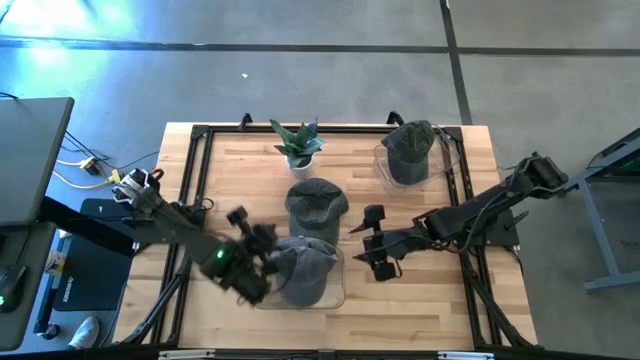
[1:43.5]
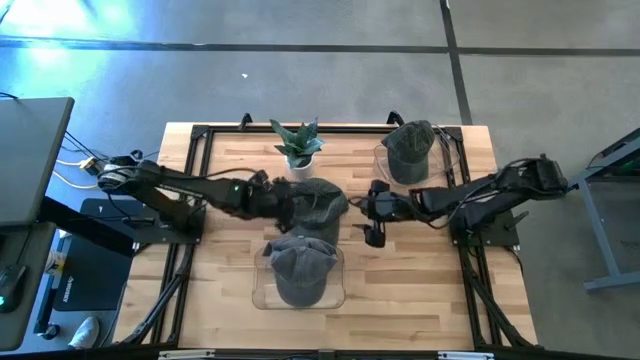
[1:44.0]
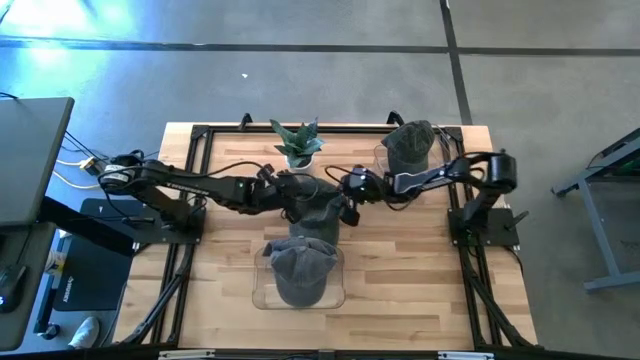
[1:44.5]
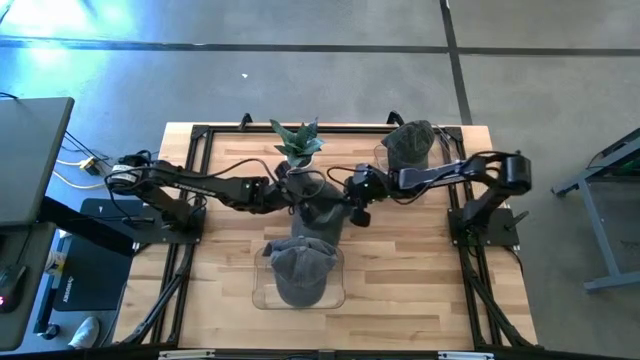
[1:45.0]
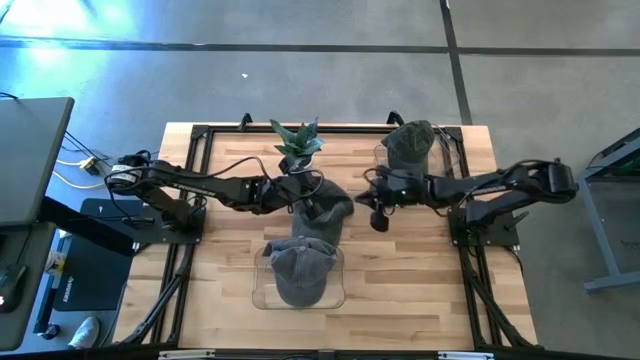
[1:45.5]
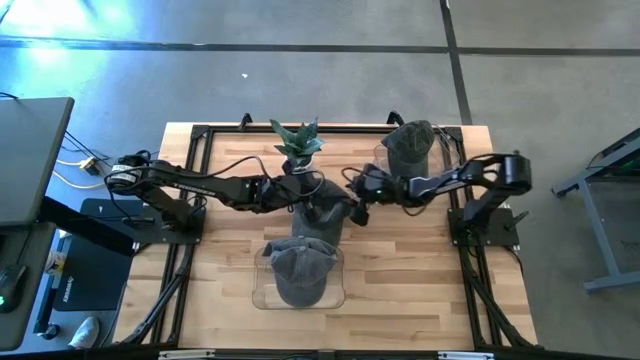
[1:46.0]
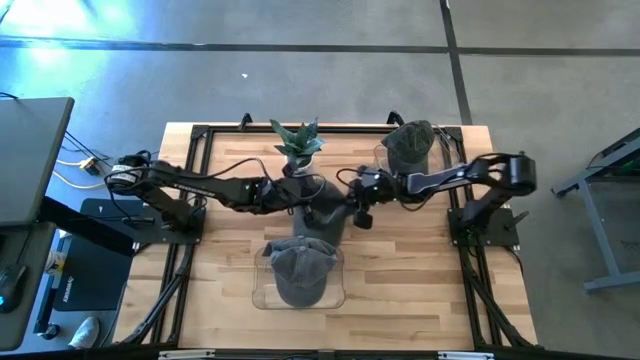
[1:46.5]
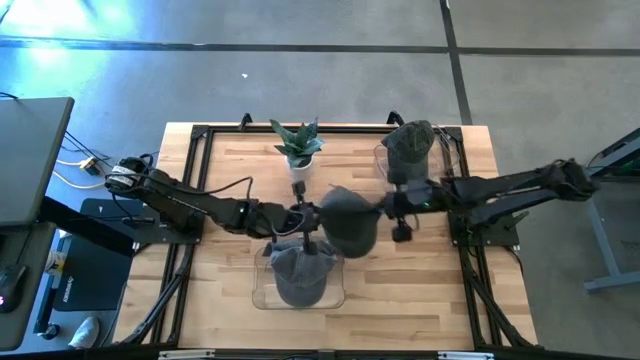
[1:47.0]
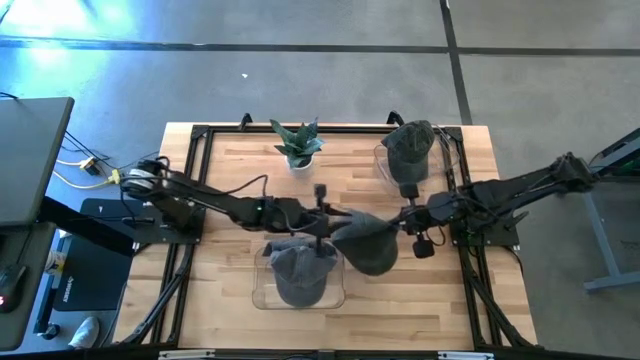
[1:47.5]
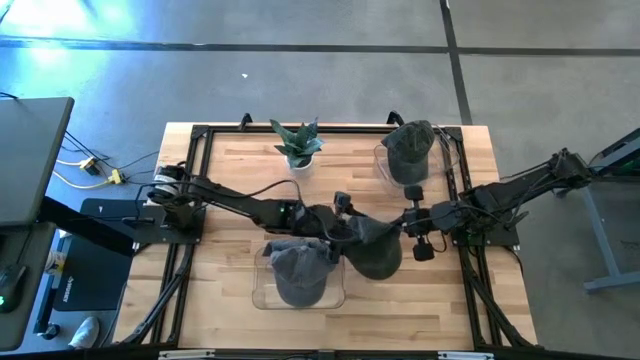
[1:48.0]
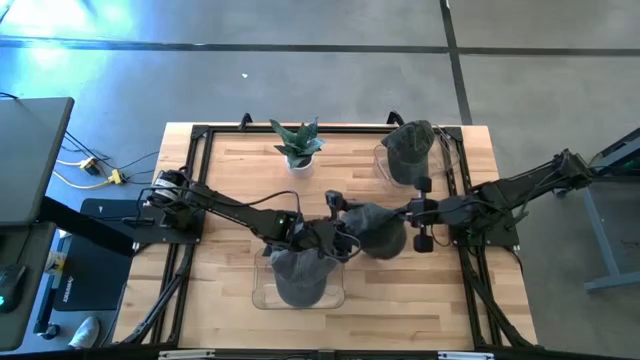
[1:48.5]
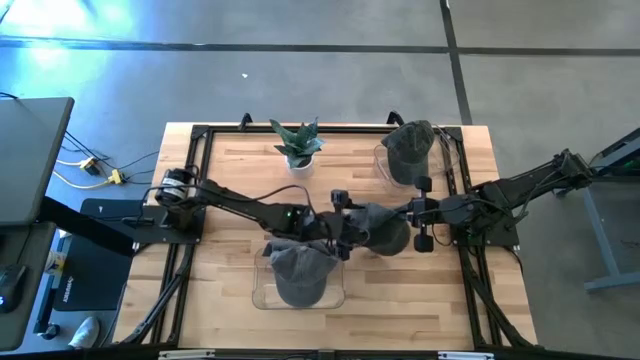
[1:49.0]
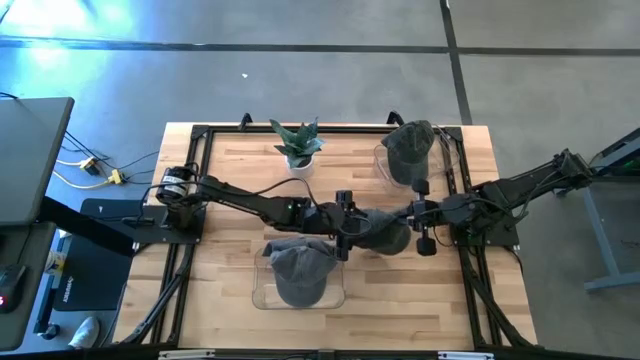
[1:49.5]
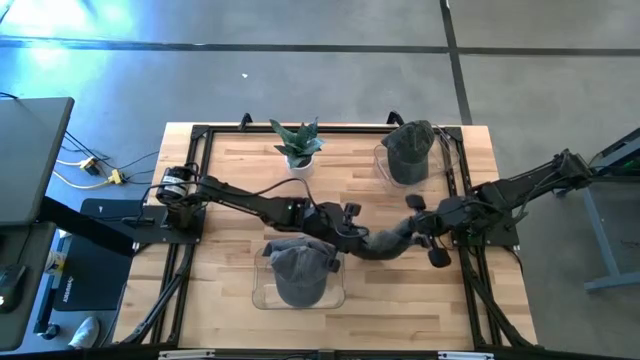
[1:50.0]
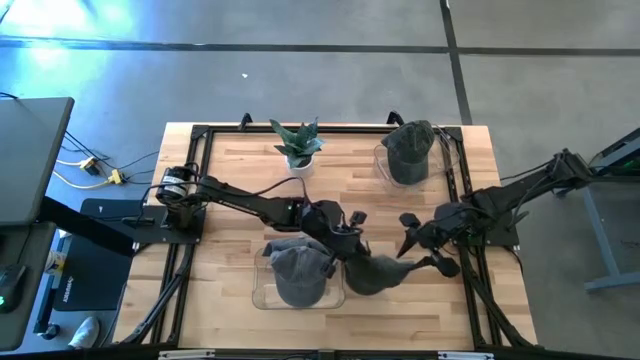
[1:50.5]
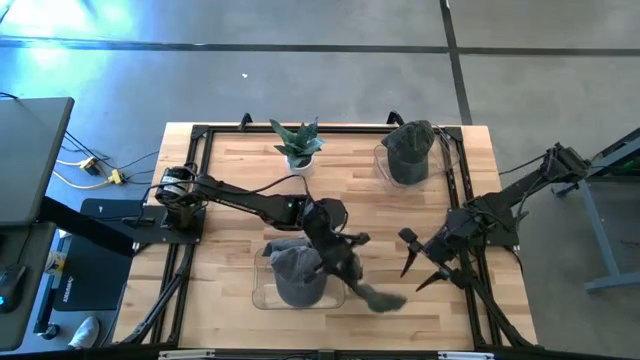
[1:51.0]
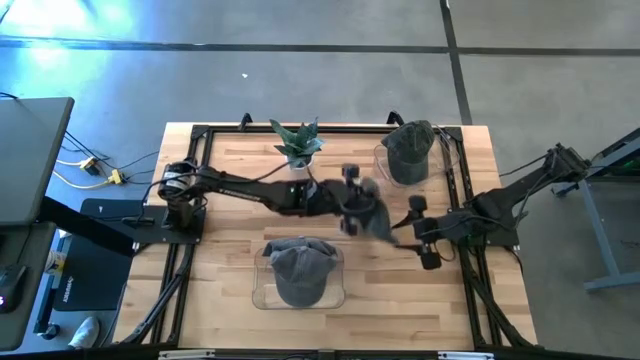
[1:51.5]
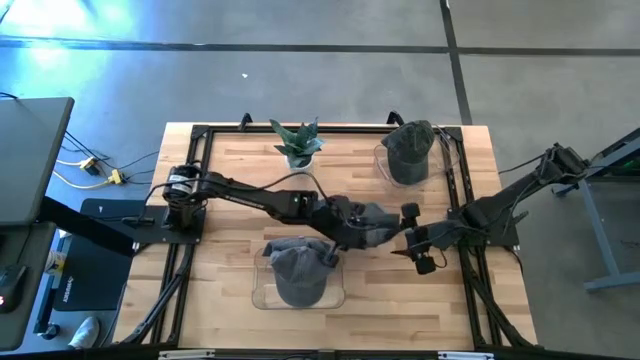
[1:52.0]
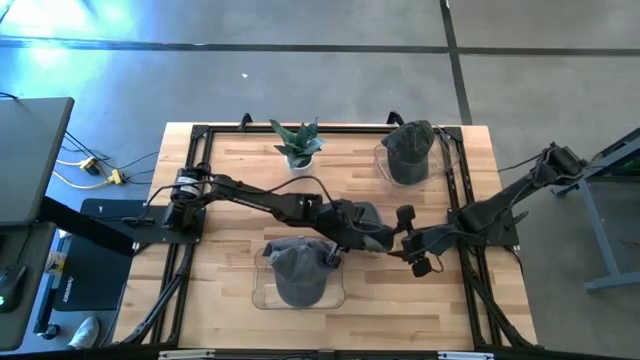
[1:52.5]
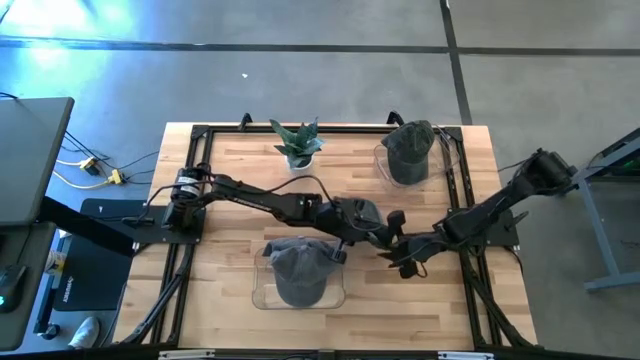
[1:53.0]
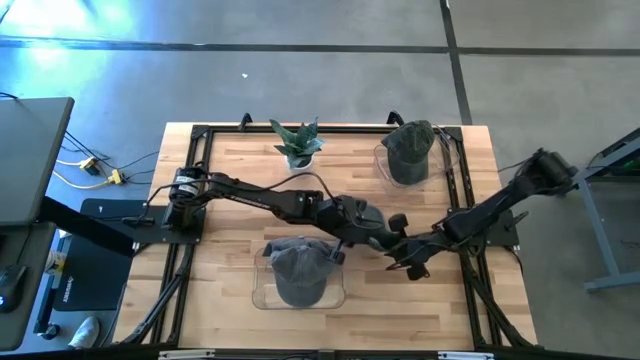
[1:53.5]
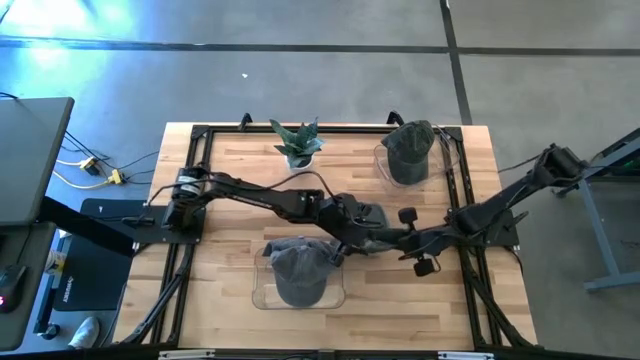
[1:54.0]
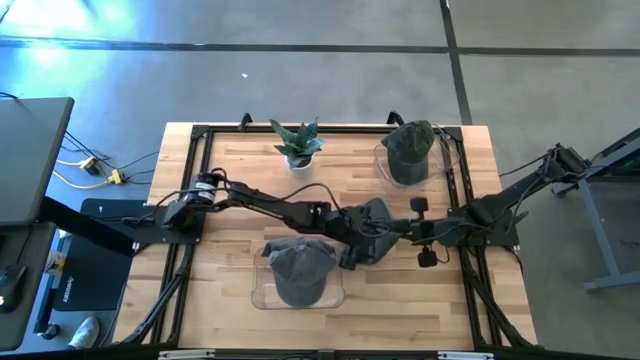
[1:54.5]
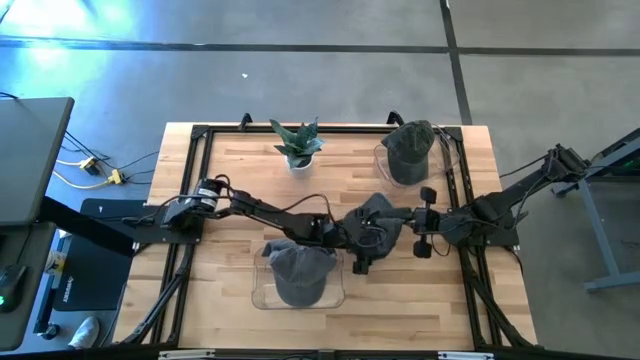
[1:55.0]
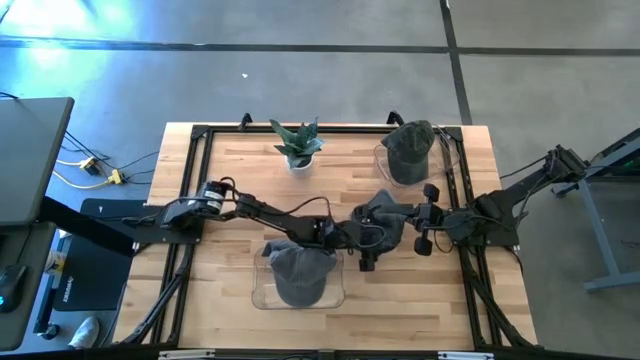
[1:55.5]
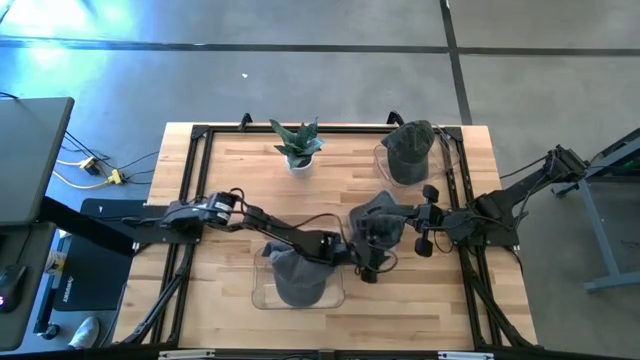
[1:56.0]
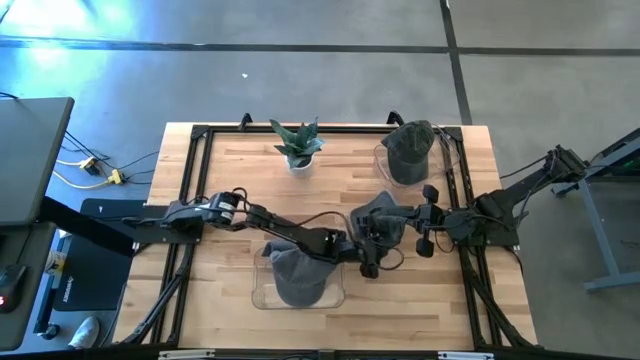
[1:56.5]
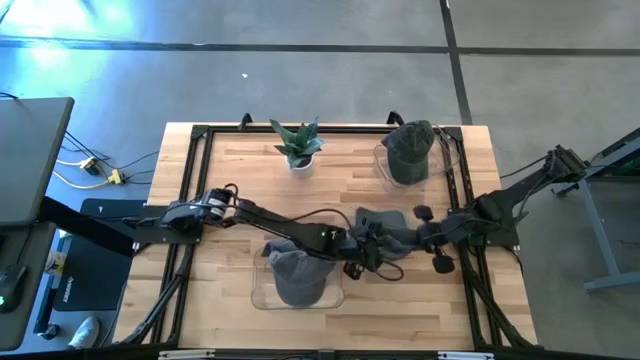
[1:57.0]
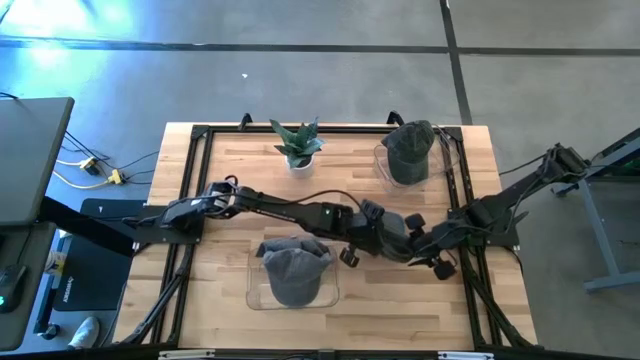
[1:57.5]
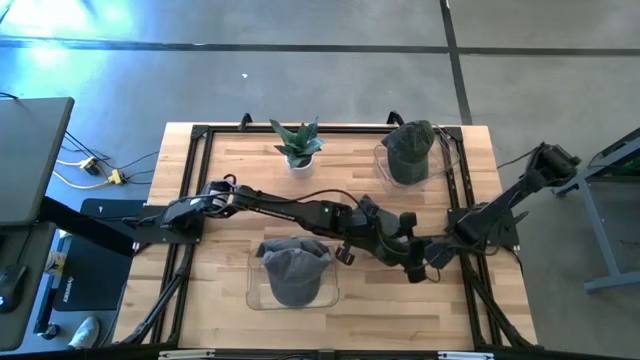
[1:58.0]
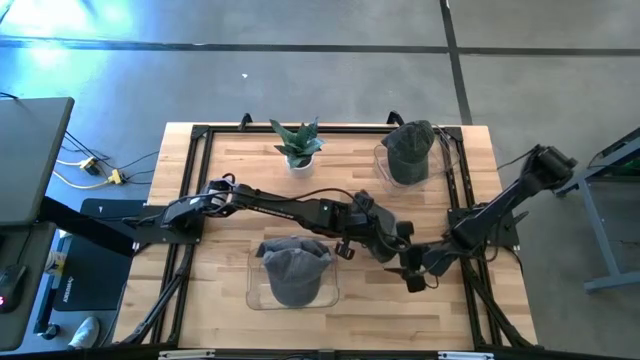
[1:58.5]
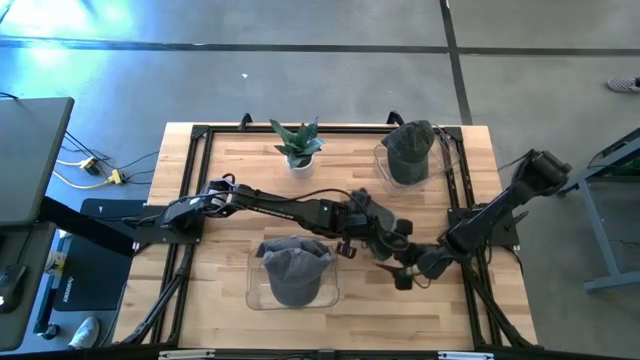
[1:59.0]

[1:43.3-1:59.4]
Task: Pick & Place hat
Put the dark green cap into the top transparent bin

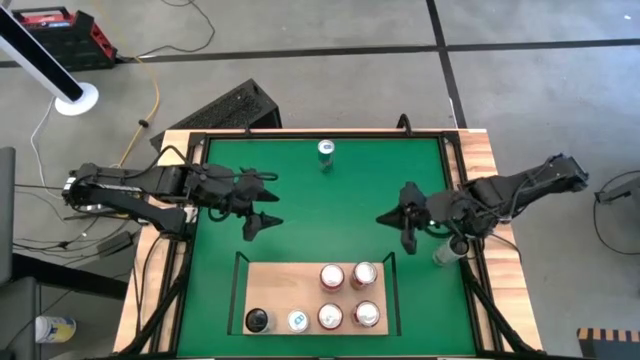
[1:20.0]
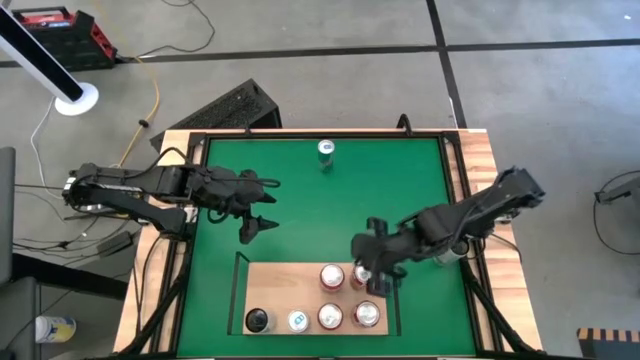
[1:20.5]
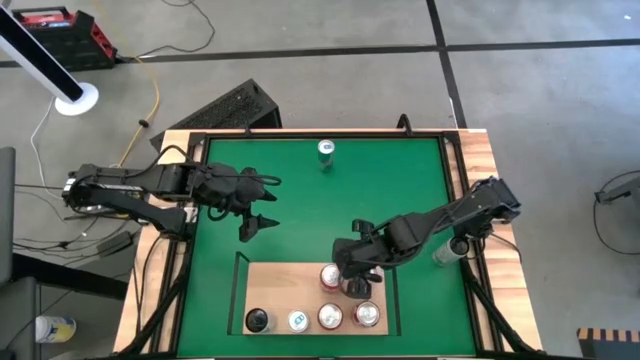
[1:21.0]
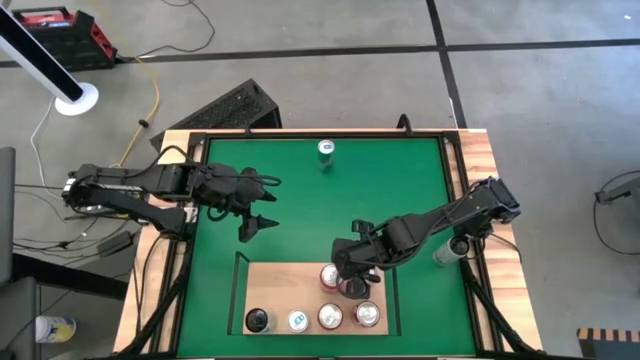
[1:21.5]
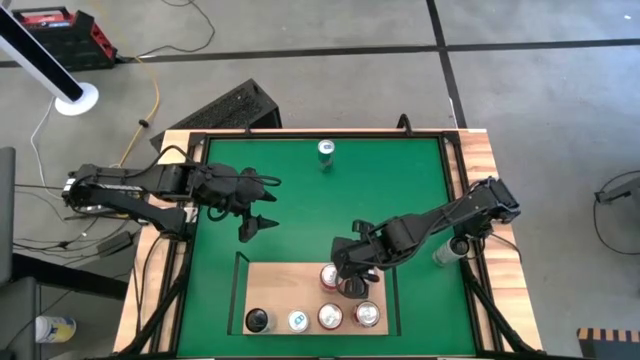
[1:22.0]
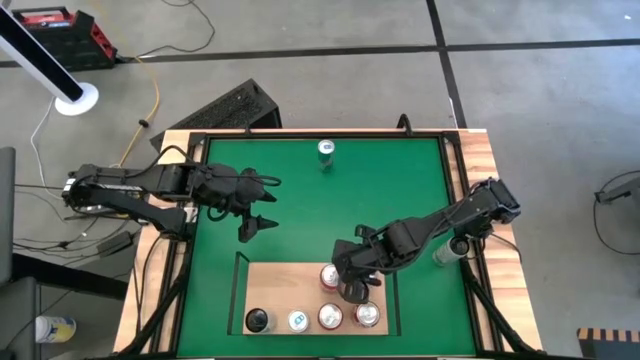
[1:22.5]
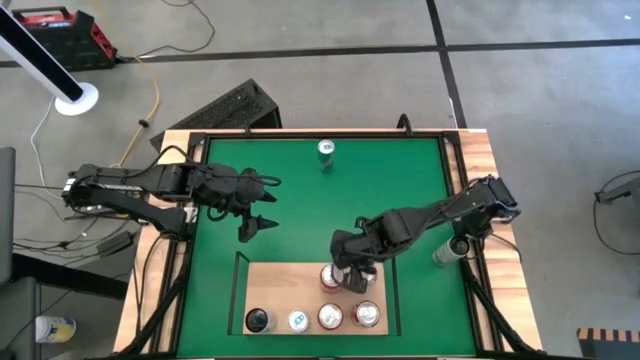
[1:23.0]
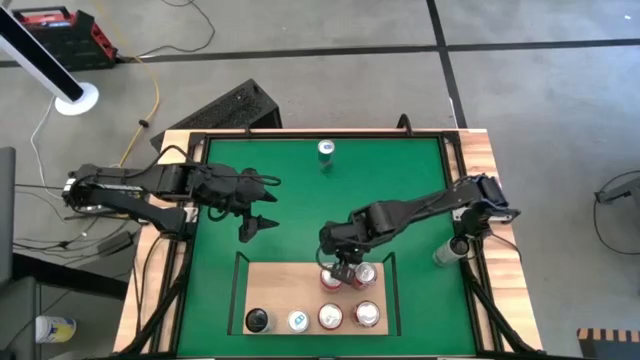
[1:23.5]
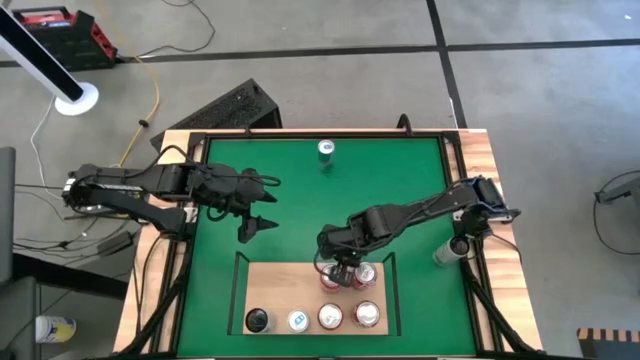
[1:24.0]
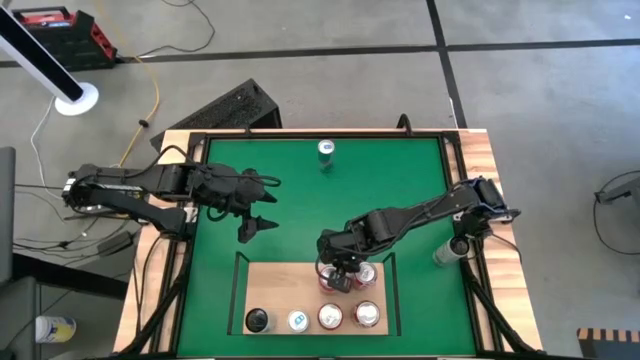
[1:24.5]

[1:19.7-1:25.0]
Task: Place canned beverage on shelf
Adjust the orange soda can on the shelf
